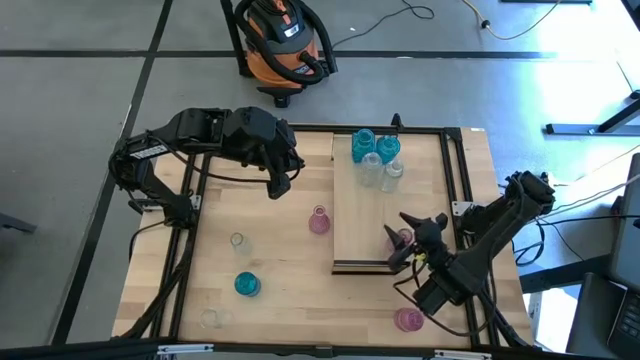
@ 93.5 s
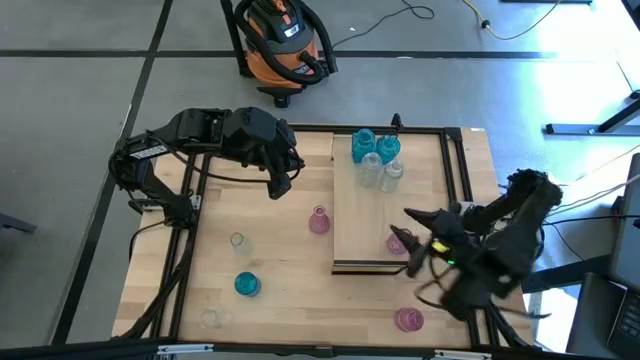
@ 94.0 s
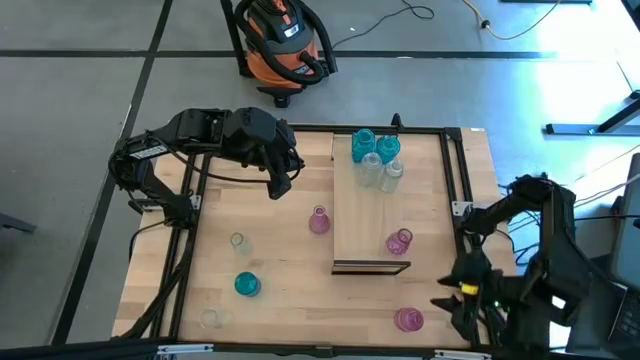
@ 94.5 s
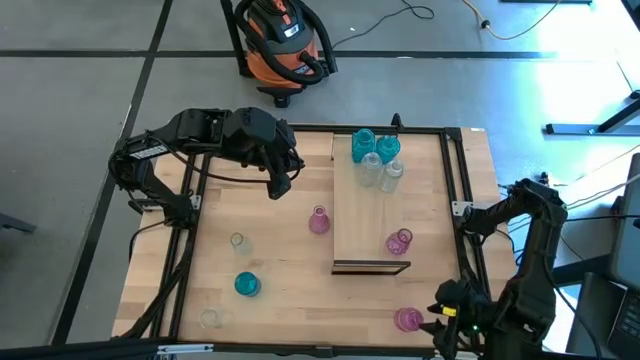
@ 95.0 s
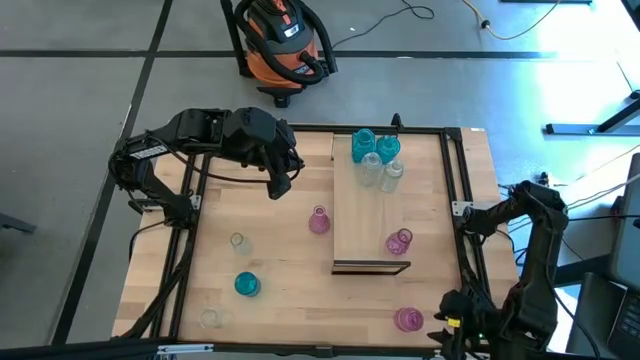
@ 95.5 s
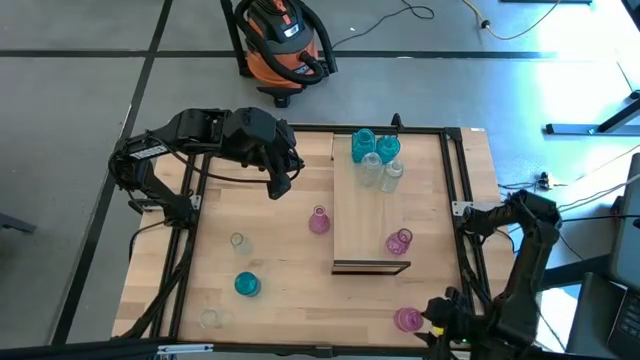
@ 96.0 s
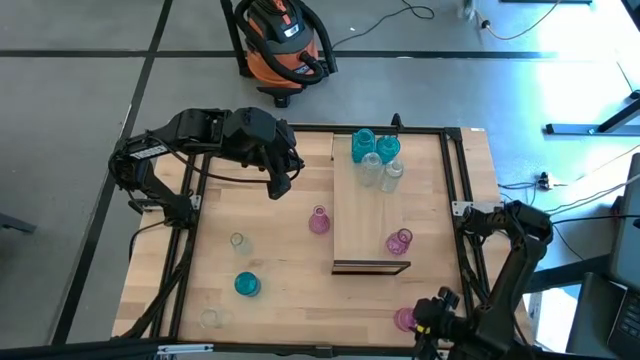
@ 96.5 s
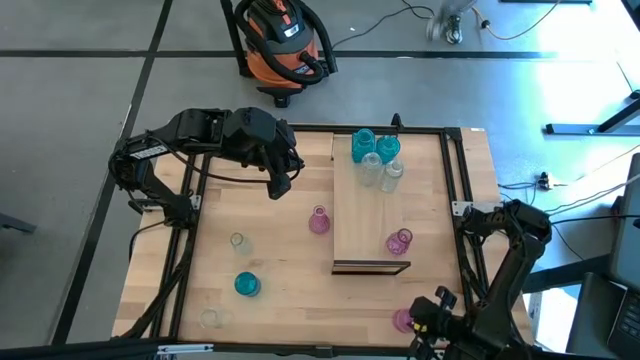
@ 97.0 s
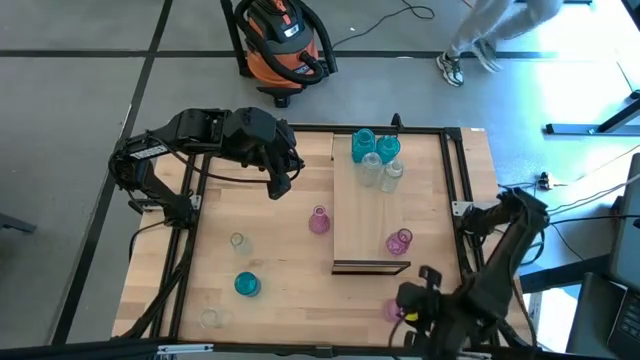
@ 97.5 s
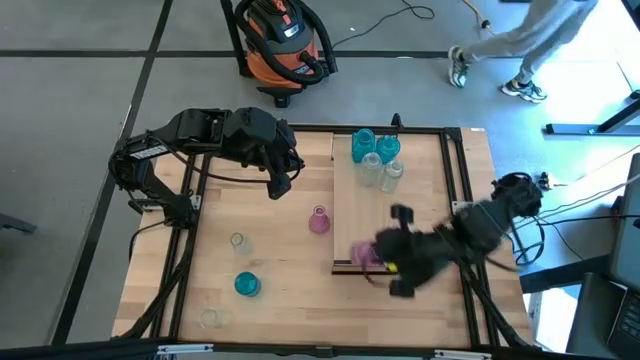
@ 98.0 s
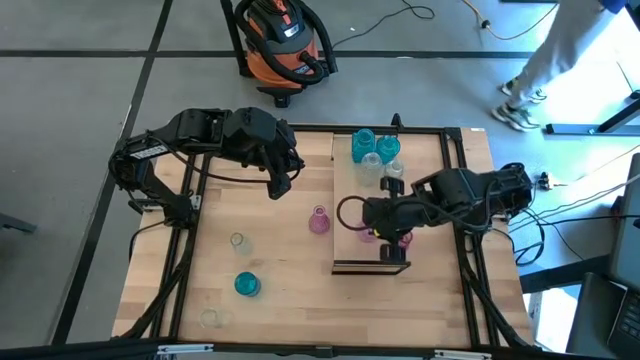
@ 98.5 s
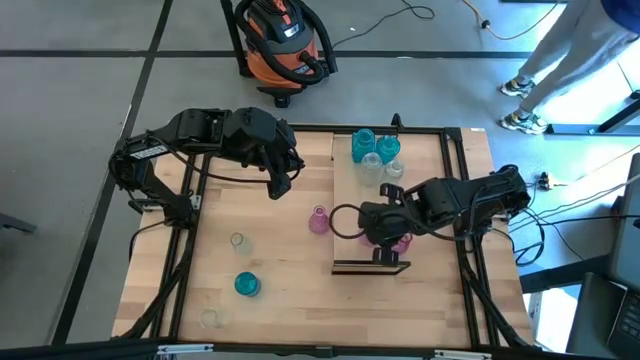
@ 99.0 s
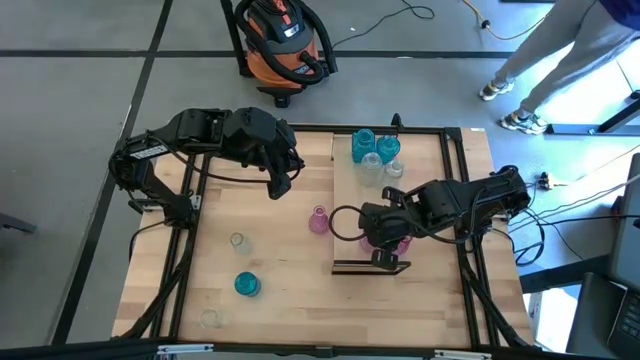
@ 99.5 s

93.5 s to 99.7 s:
Task: sort vases onto shelf
Put the pink vase on the shelf aligned with the other pink vase

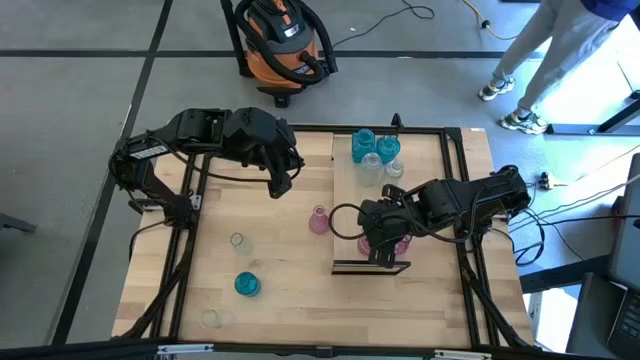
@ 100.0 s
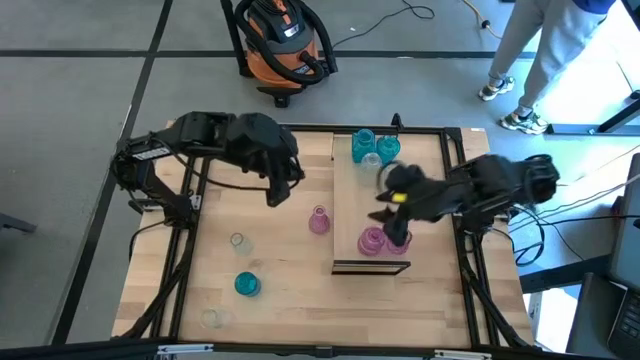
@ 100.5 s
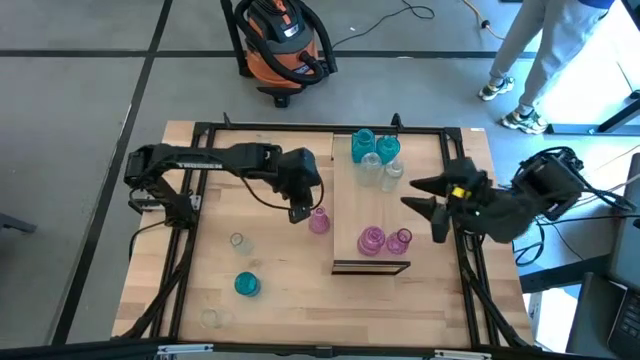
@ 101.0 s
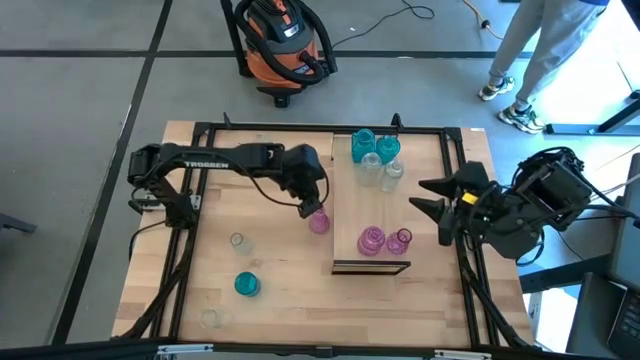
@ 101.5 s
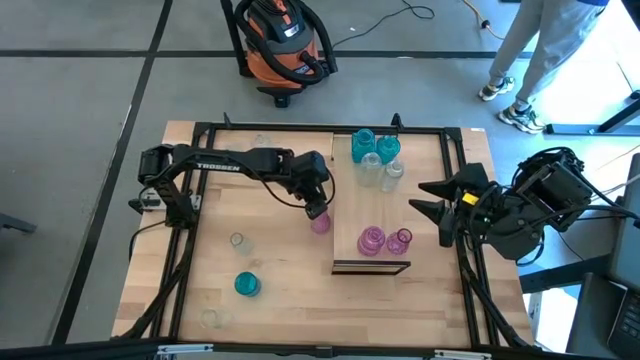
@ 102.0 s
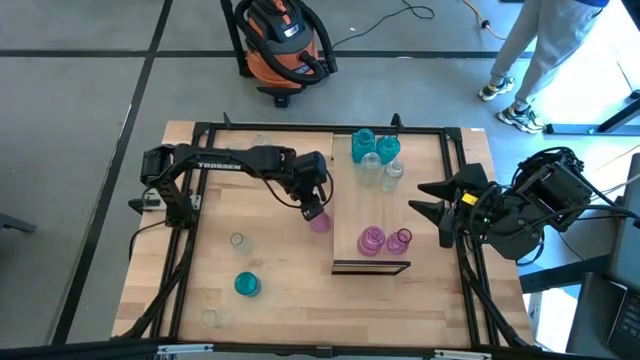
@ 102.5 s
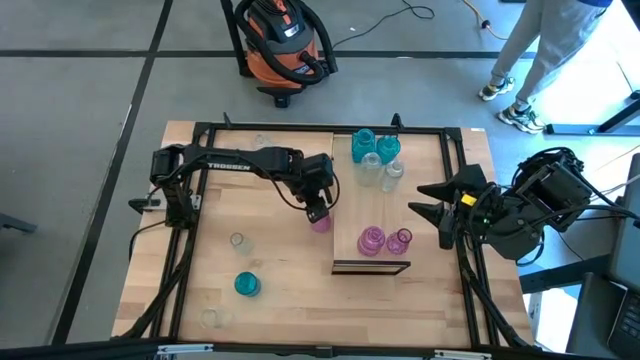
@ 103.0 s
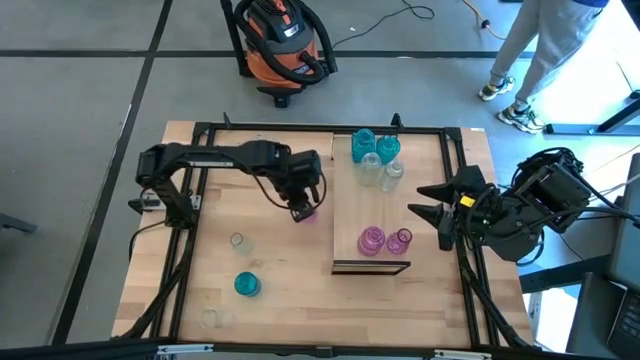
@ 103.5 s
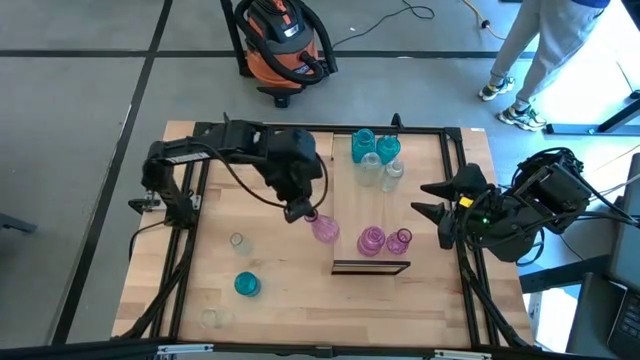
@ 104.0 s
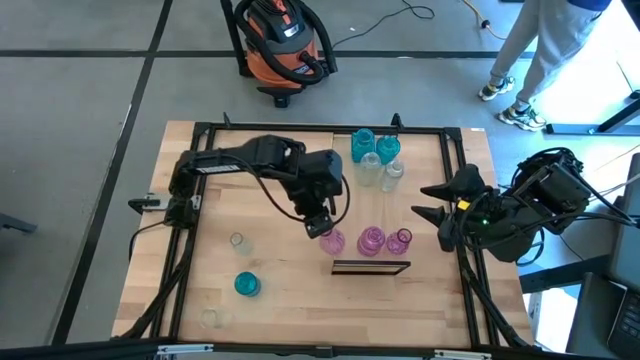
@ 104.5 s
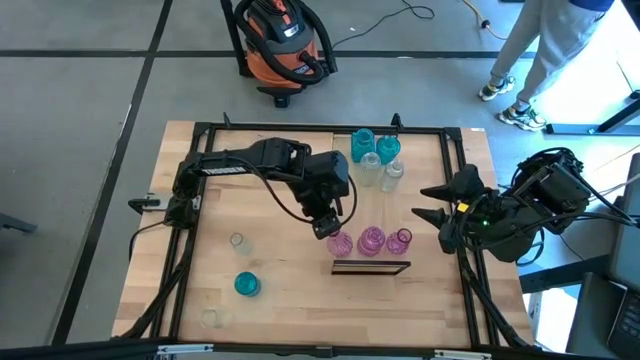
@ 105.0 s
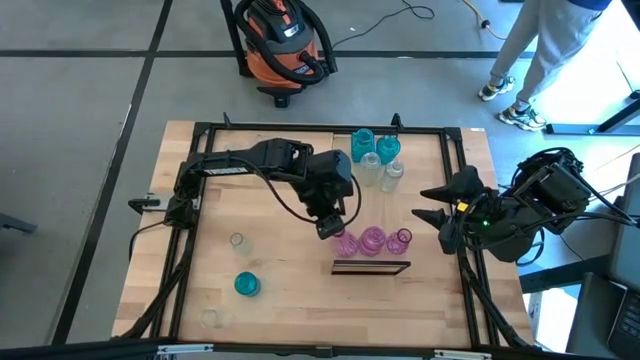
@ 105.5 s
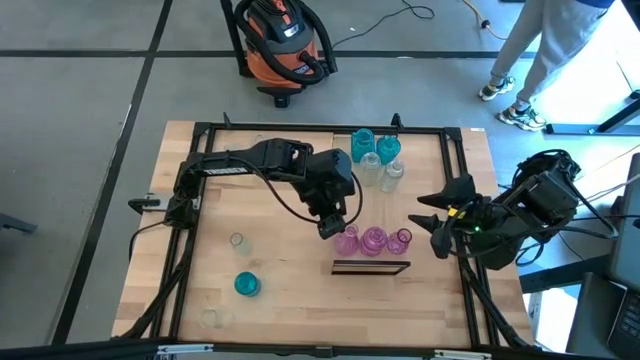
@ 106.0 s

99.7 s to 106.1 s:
Put the pink vase on the shelf aligned with the other pink vase

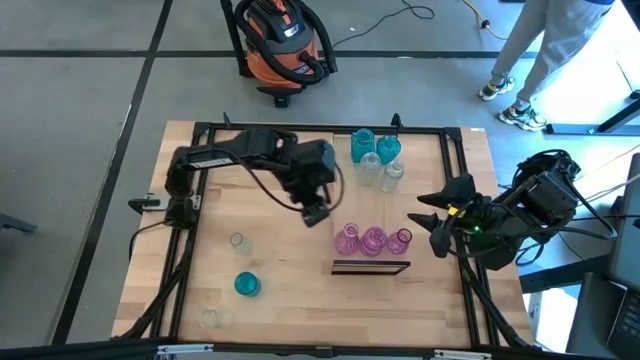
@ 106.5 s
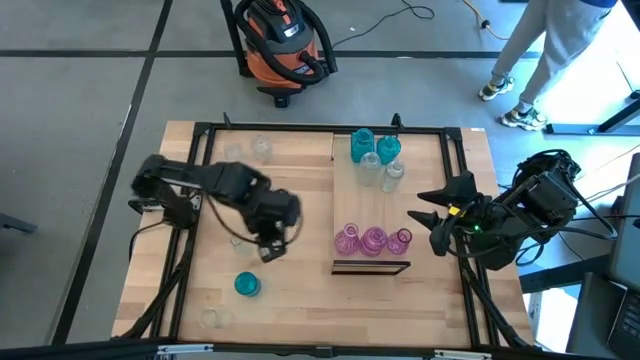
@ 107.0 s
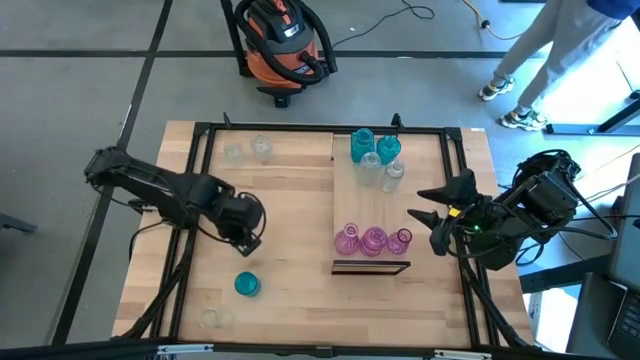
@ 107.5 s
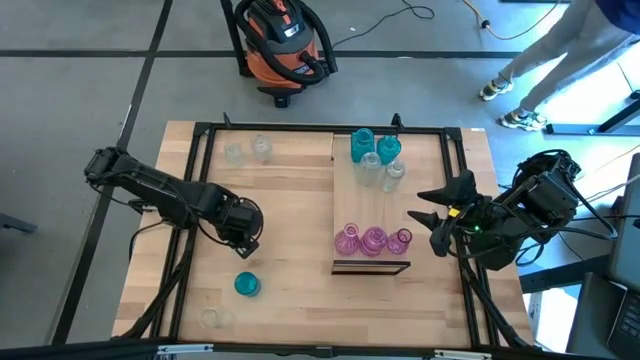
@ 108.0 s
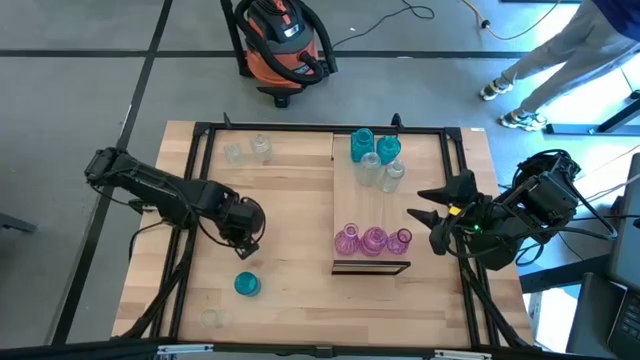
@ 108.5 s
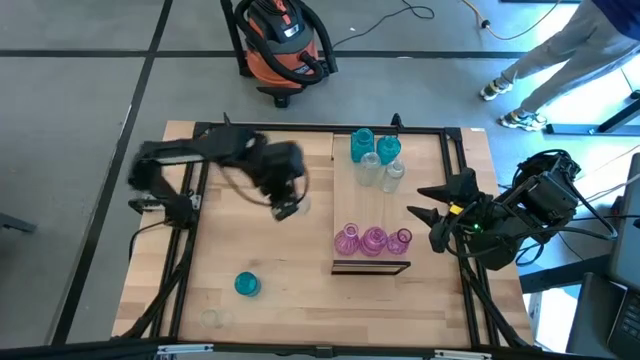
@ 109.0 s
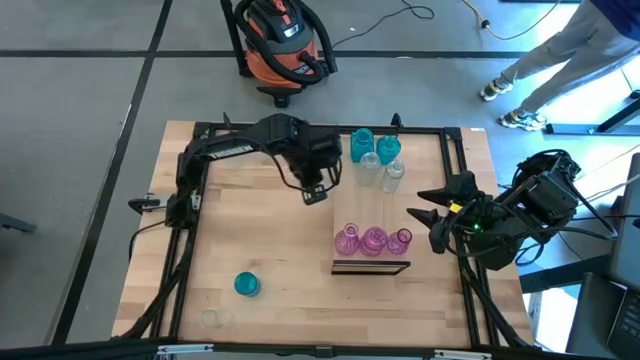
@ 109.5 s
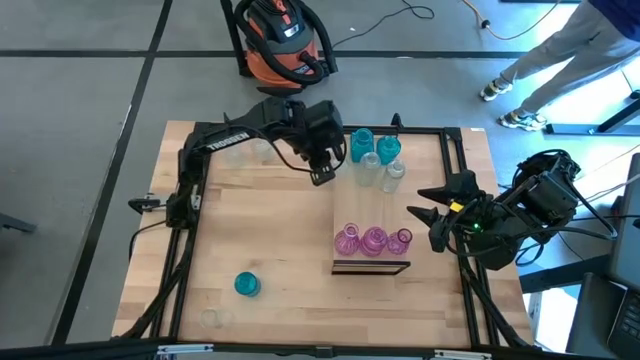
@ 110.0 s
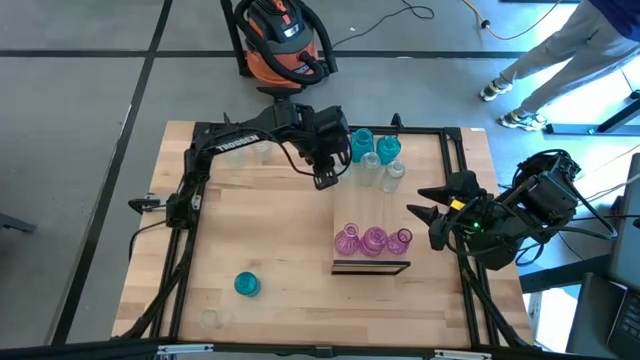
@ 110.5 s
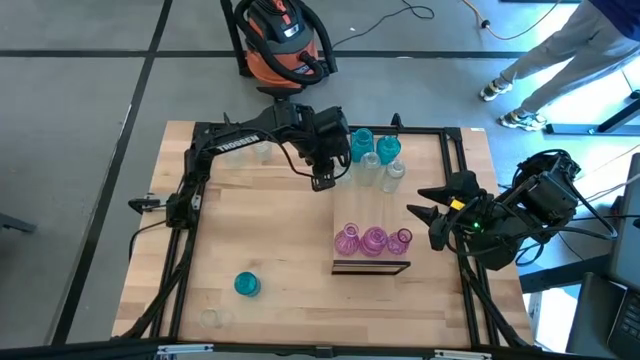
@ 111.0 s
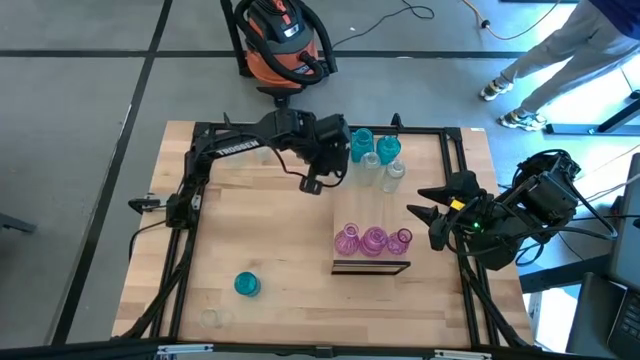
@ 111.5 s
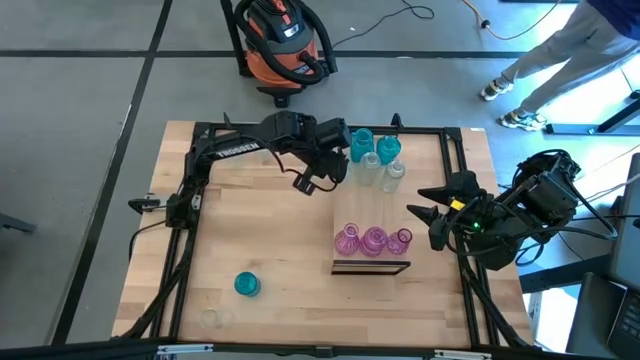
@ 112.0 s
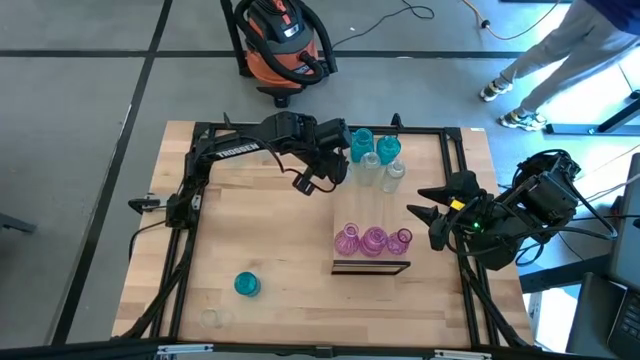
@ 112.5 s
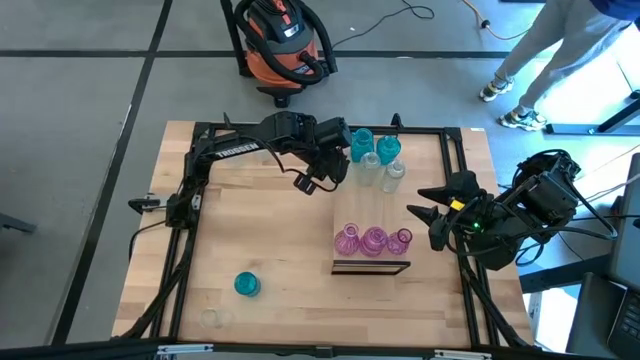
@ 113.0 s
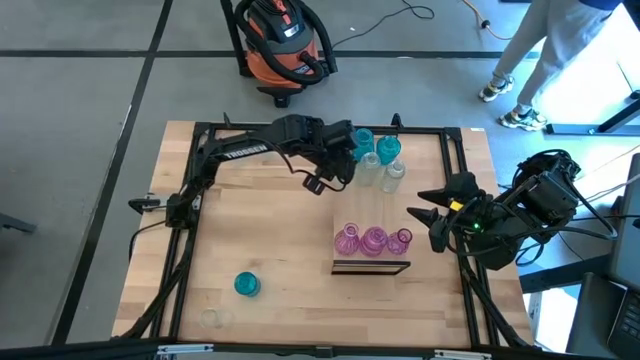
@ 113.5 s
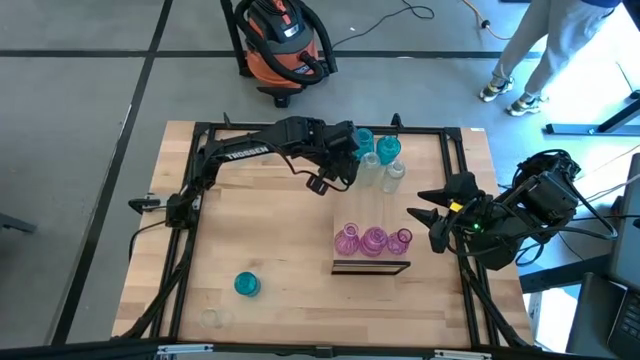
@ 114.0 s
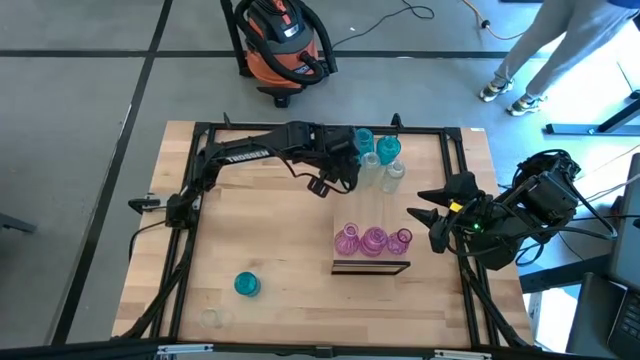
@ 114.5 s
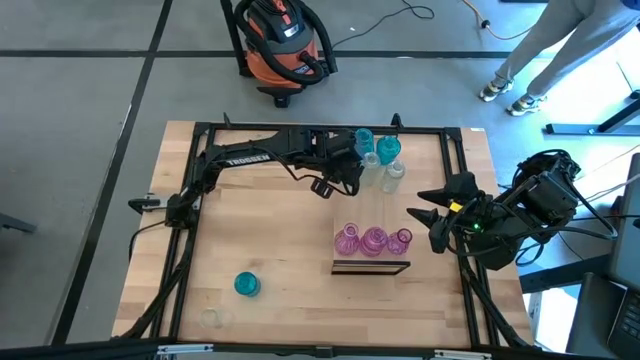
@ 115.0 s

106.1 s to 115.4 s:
Put the transparent vase on the shelf aligned with the other transparent vase
